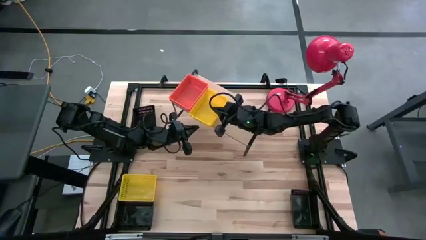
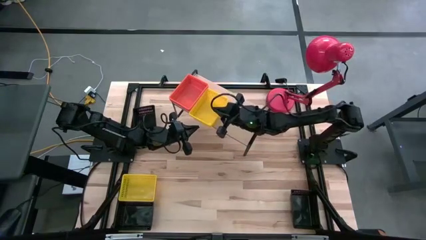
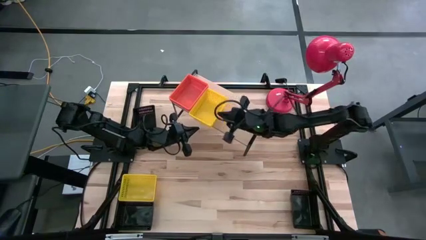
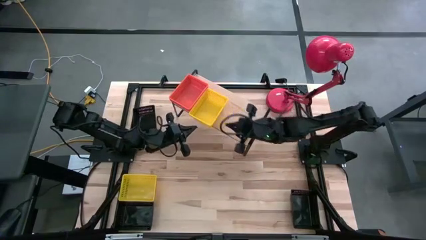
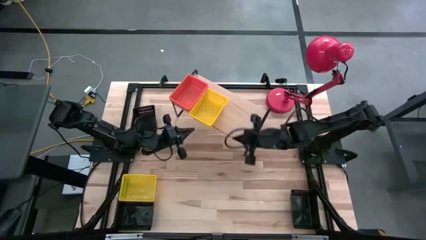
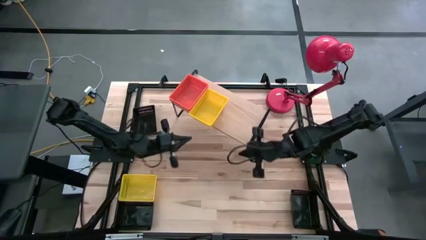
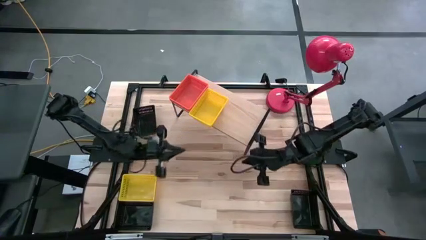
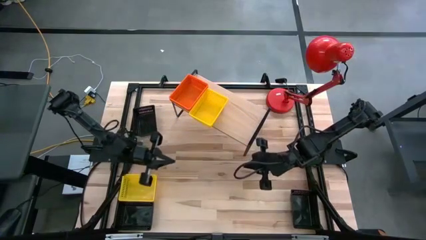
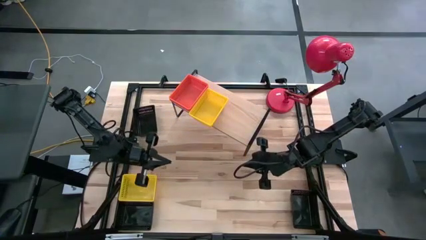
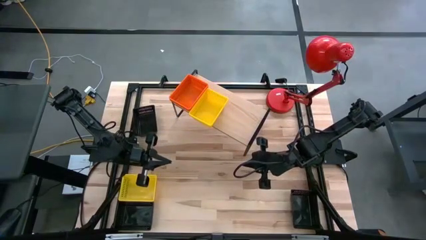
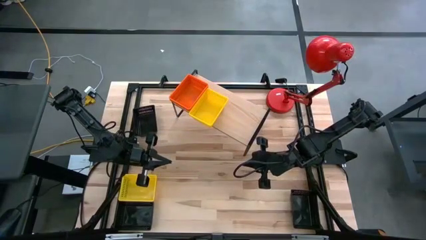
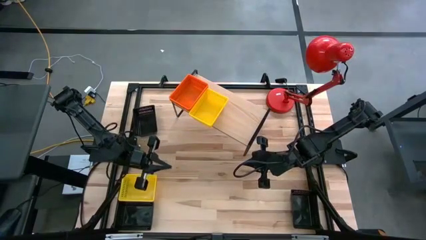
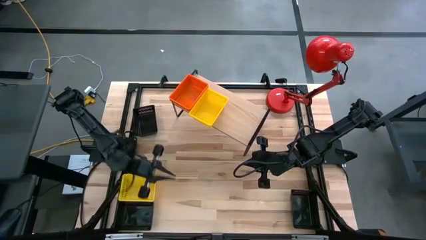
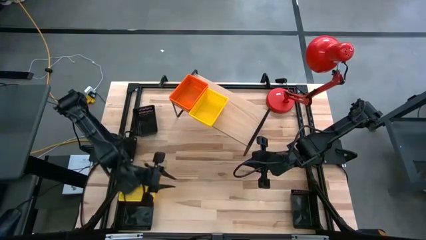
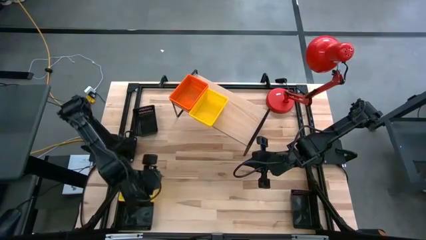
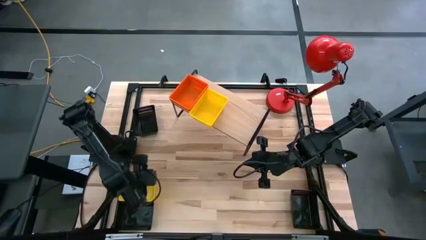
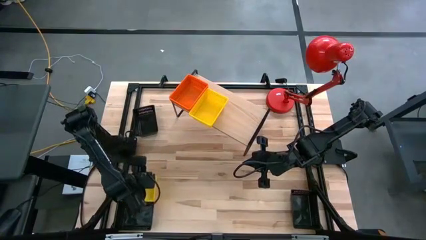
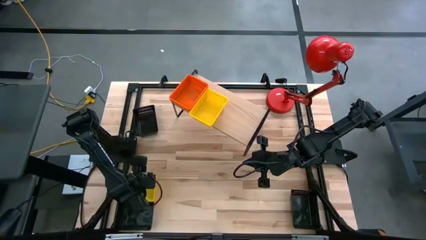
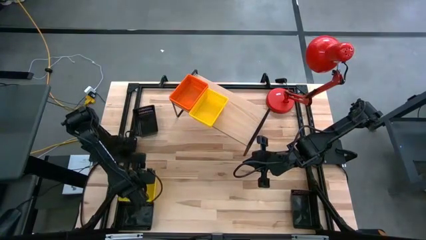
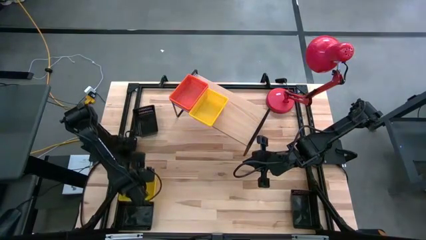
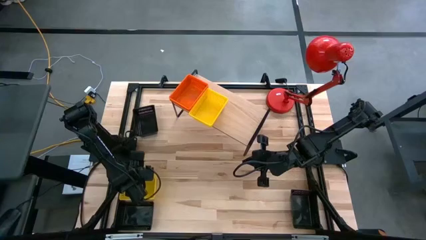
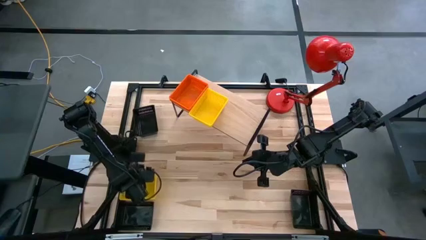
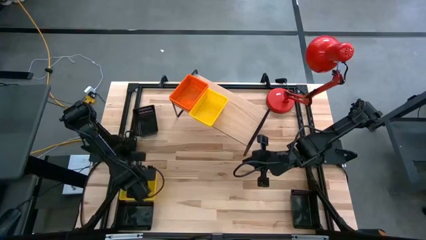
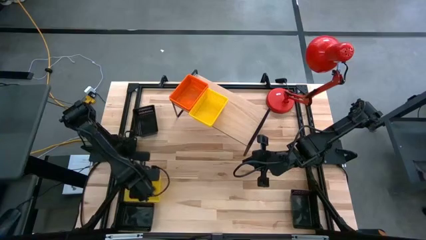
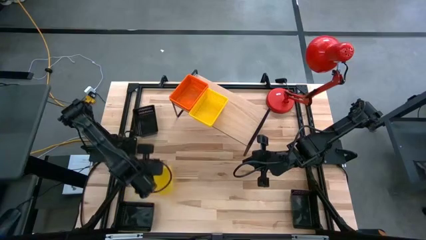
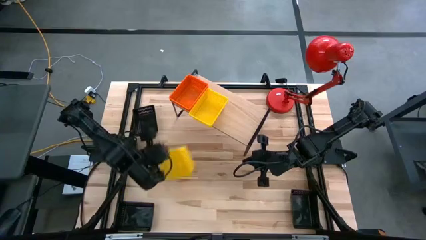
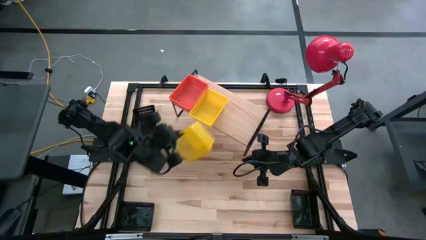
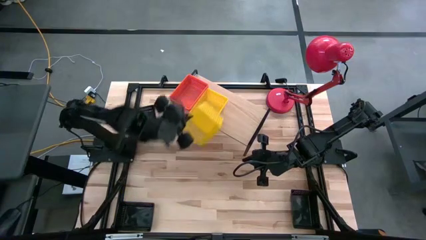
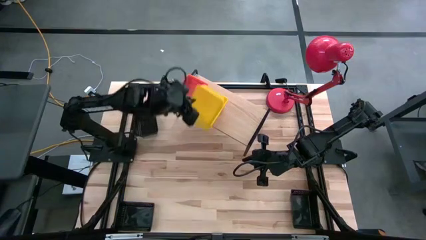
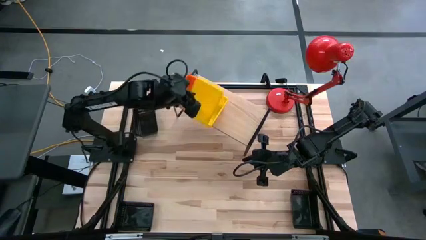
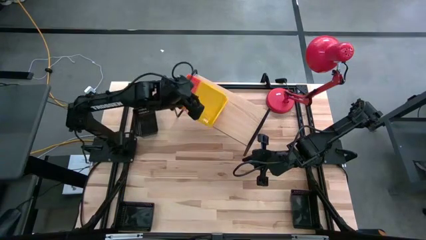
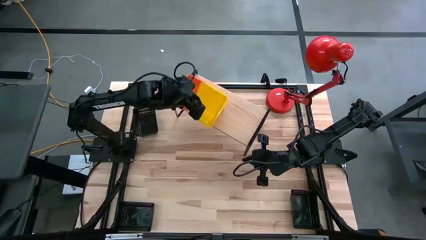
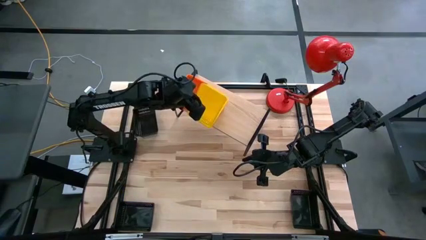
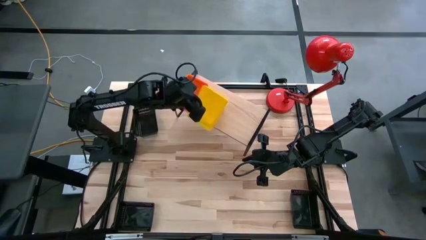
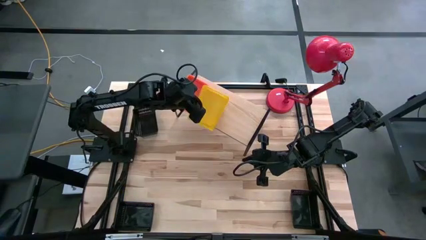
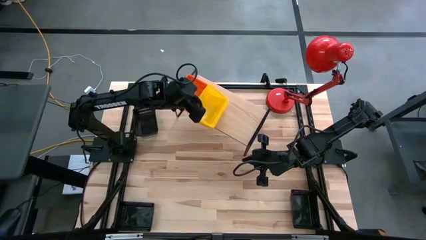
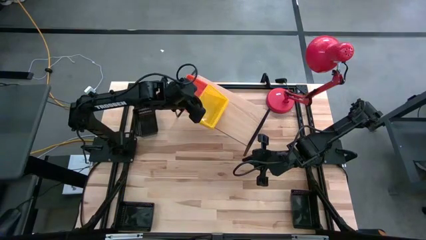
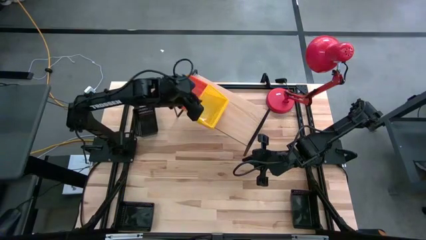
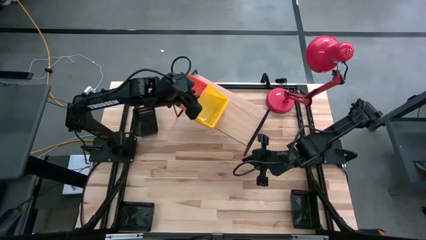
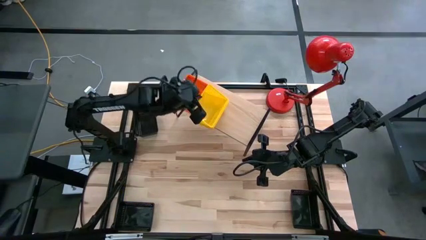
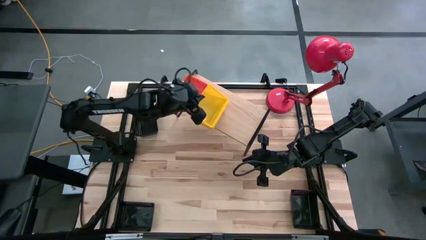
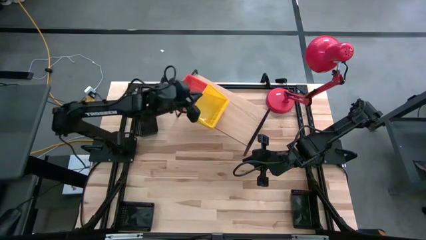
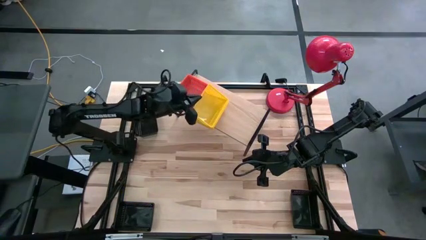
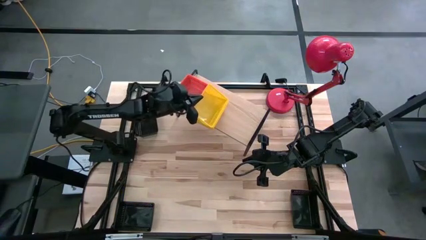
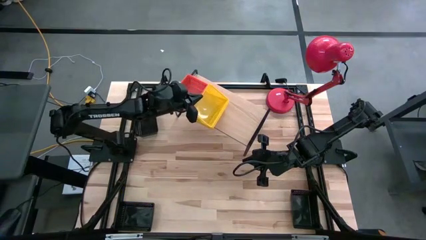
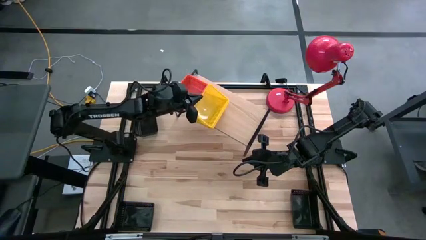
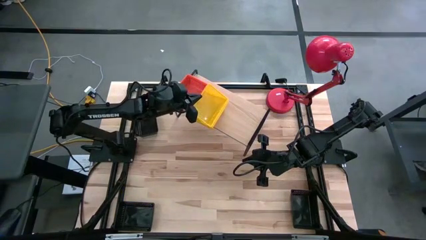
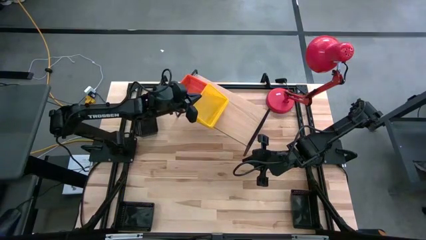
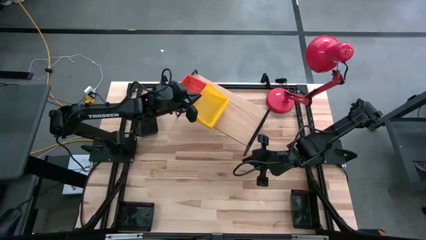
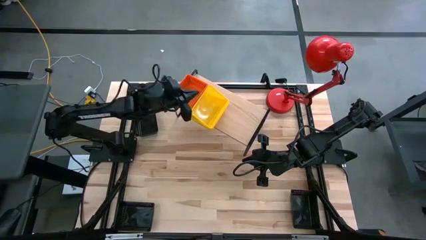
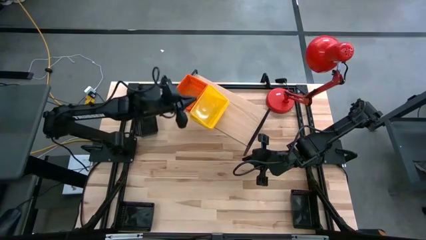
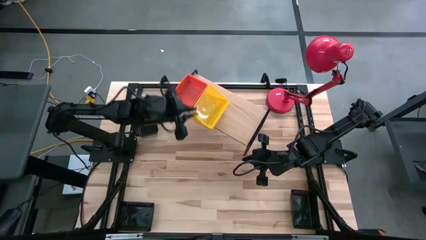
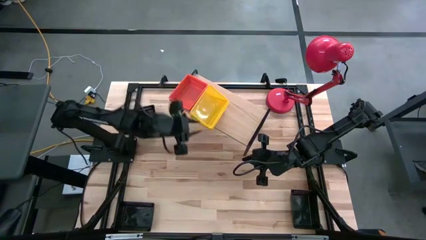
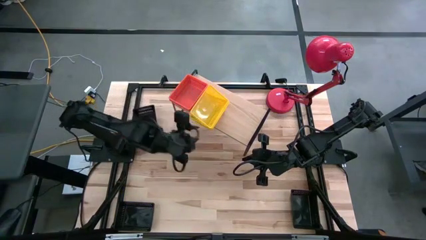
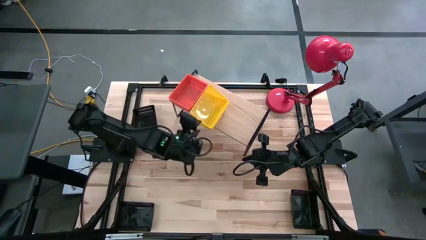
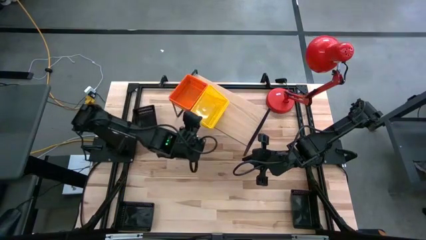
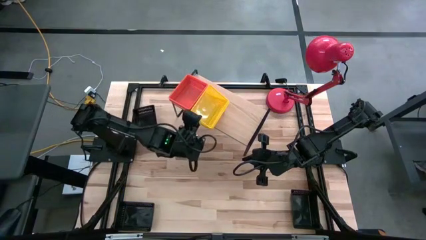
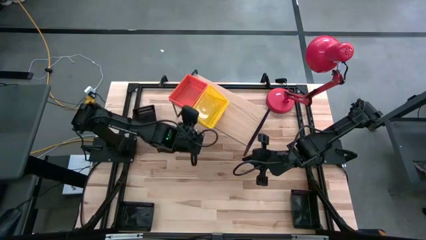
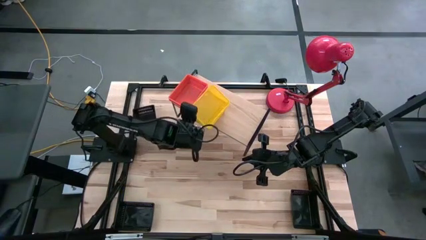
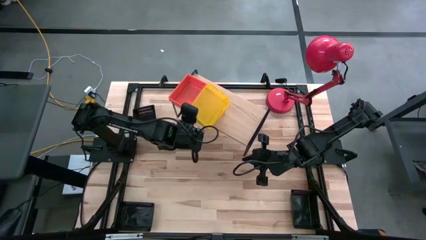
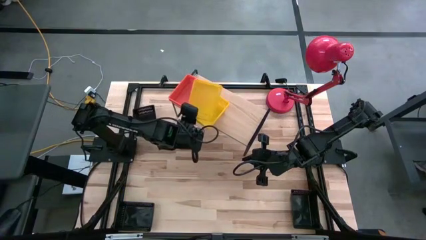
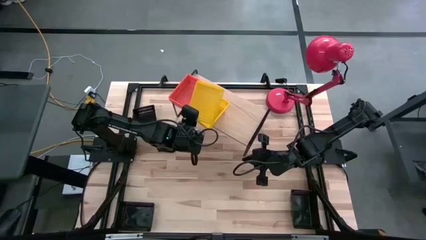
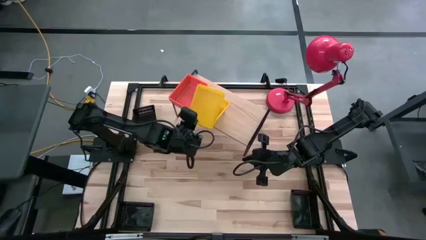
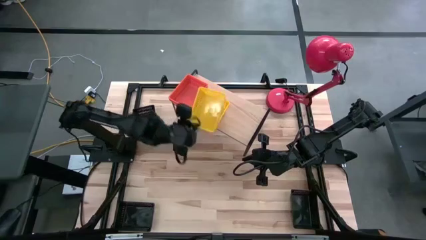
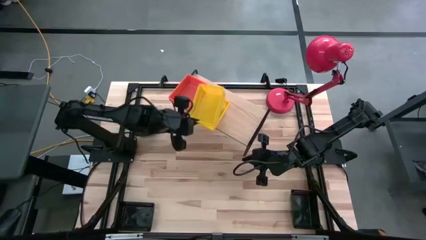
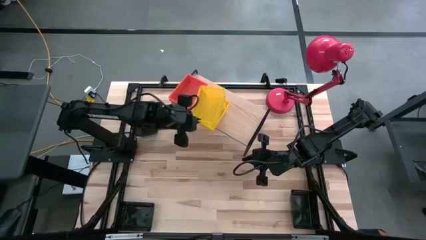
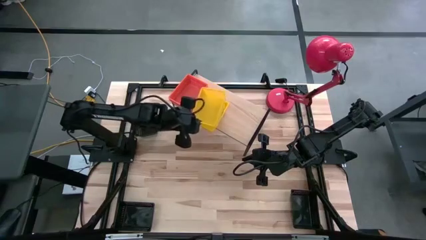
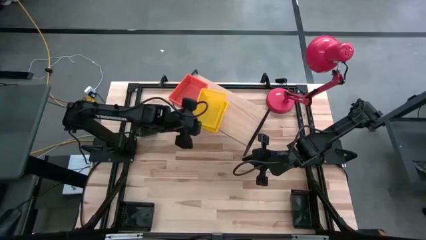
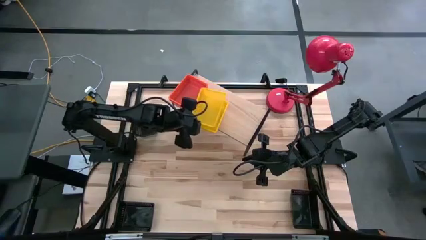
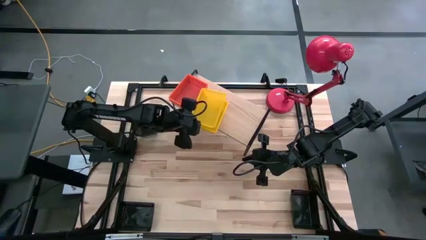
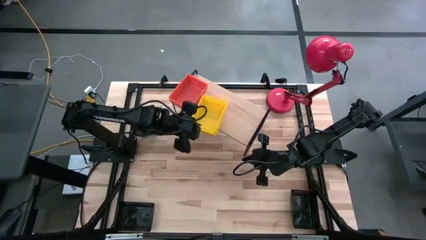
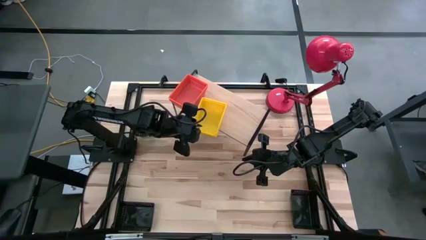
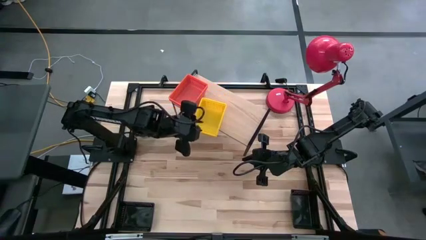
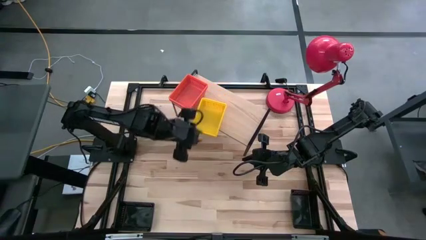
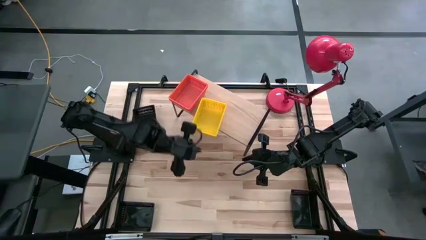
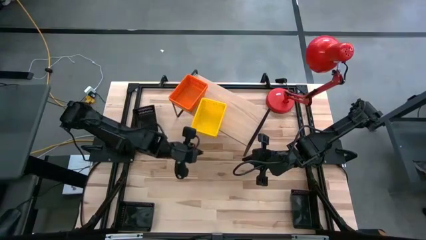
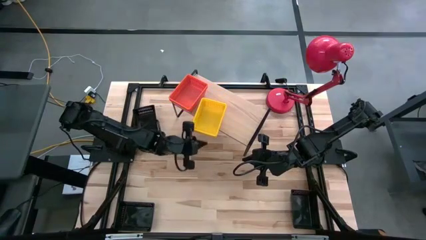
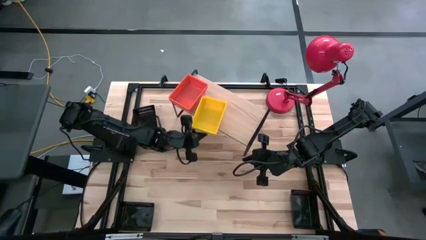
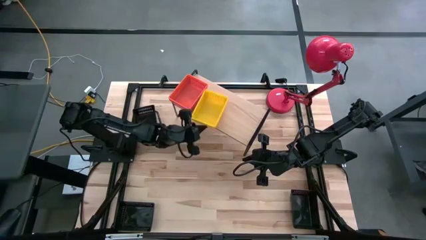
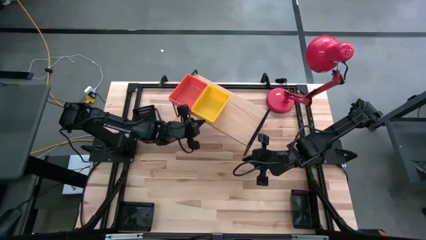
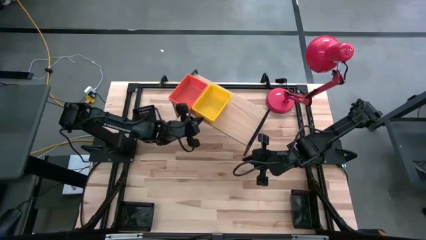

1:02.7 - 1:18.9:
Task: Stack baskets on shelf by color
Stack the yellow bin on top of the yellow bin on the shelf
